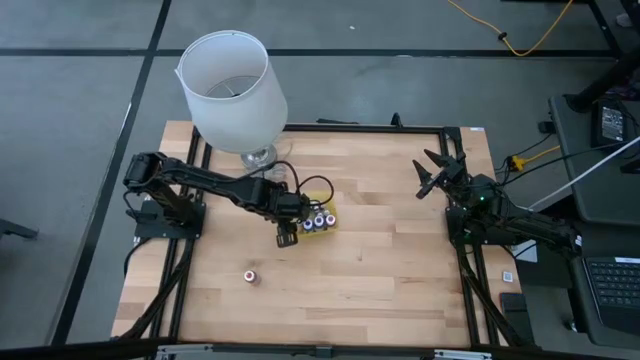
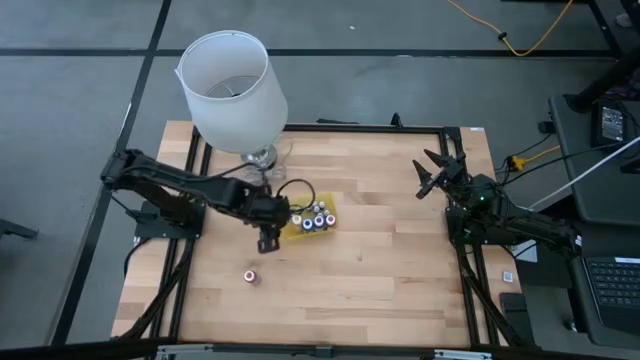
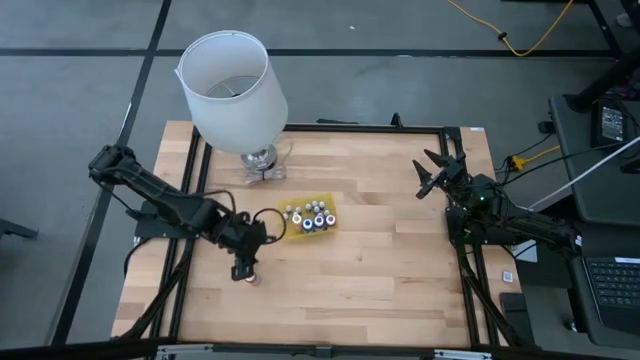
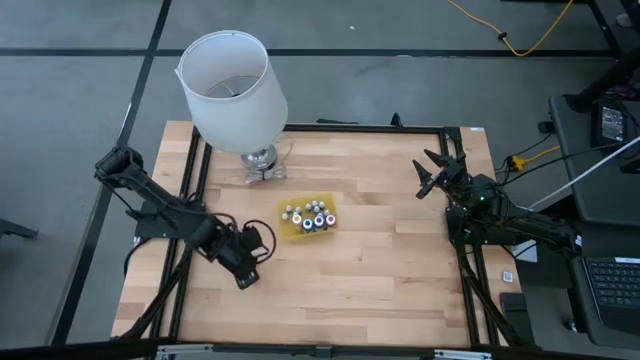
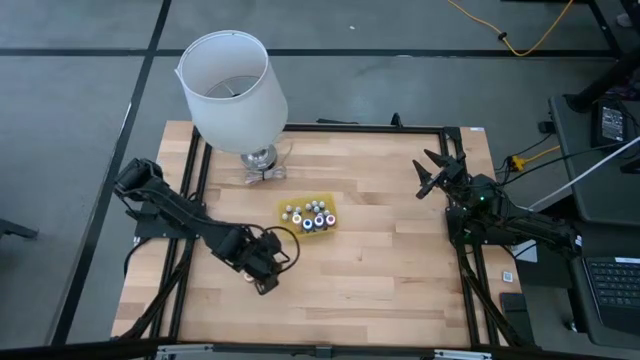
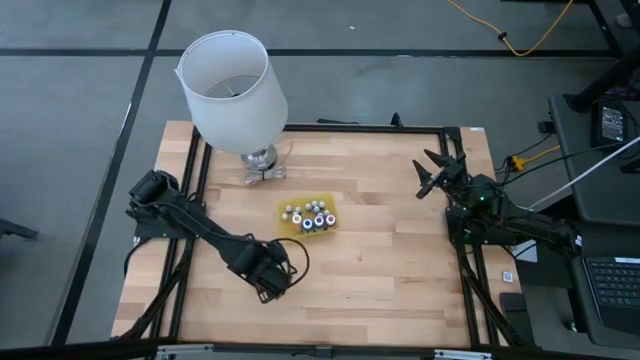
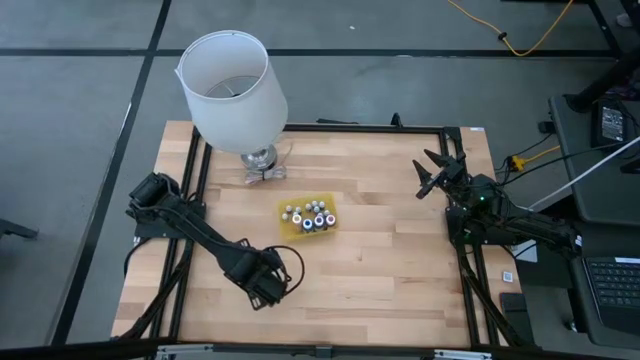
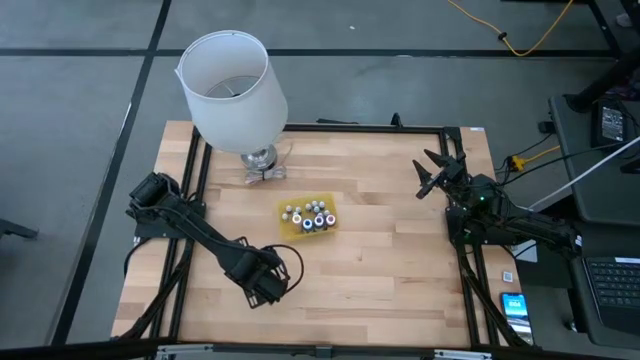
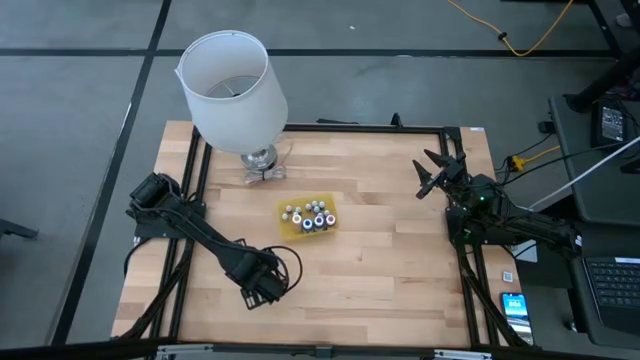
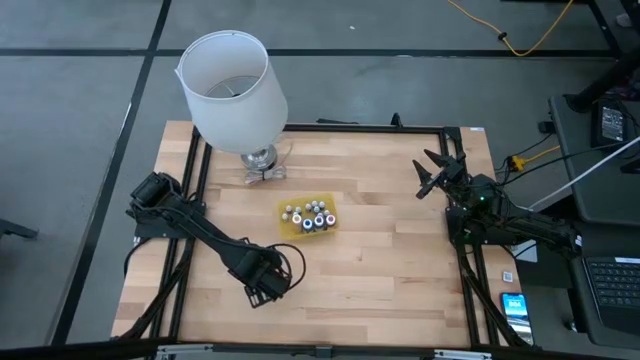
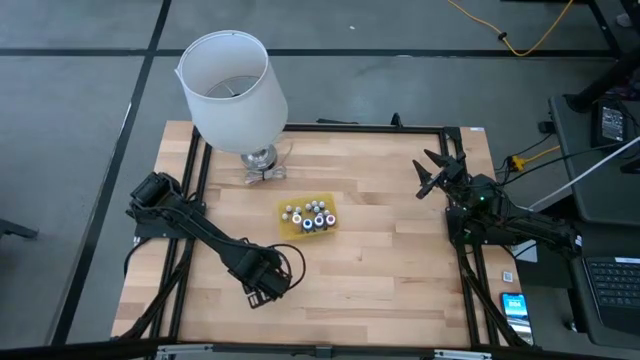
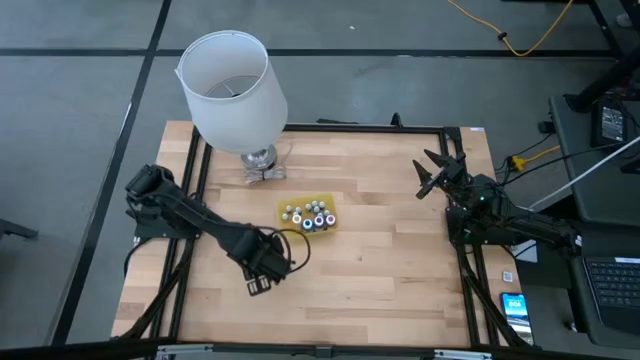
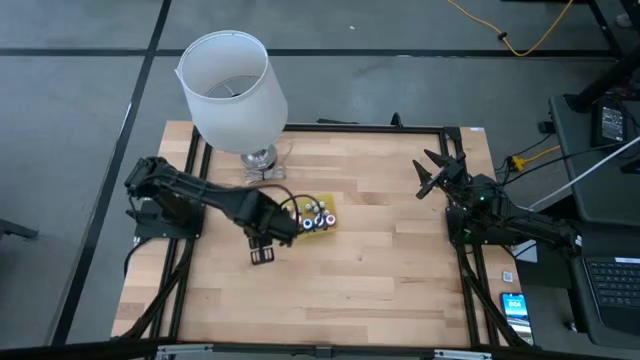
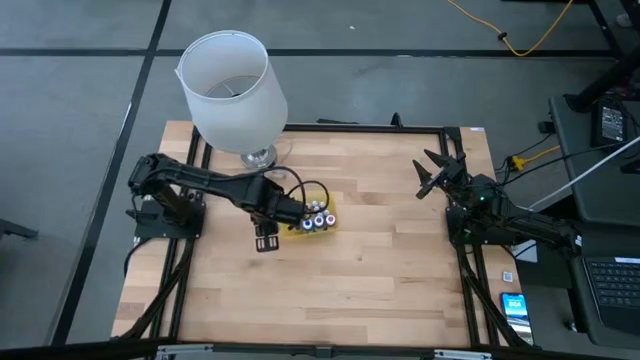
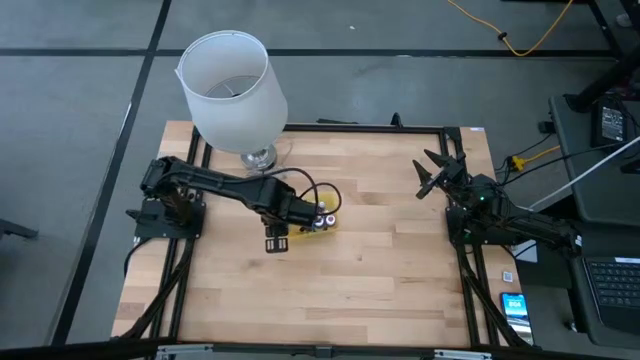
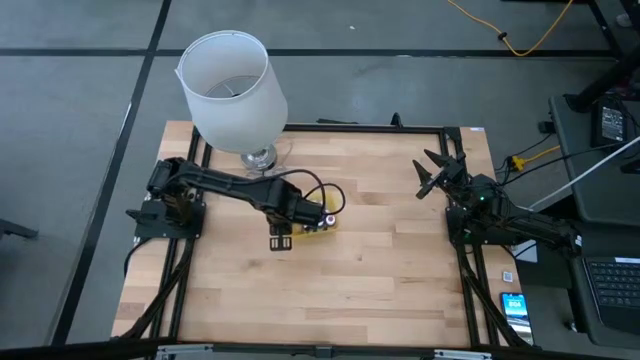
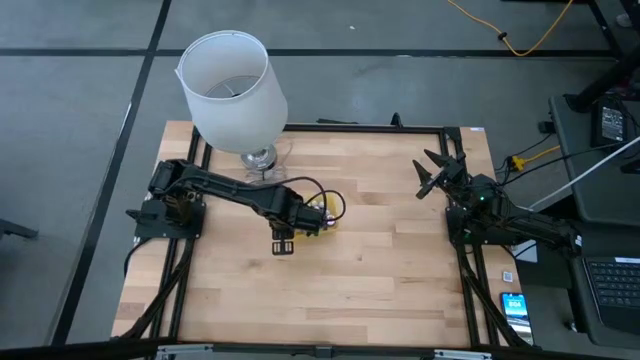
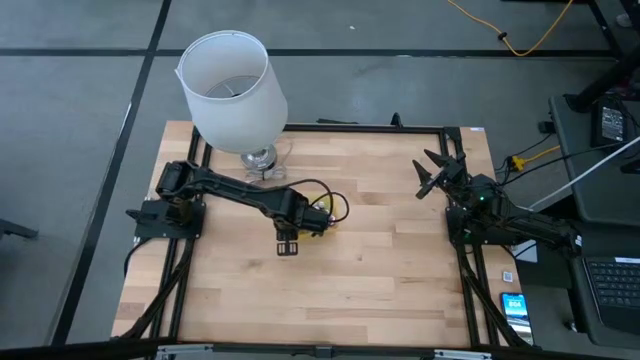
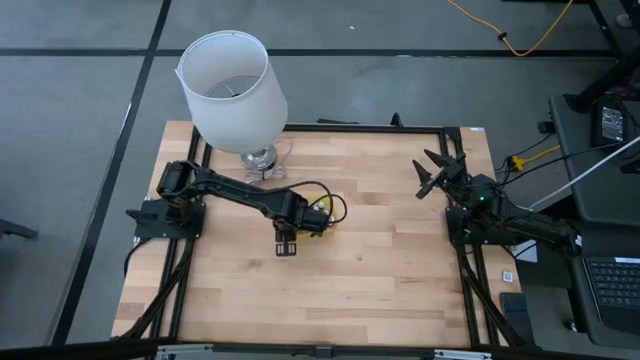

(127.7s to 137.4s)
Task: Pick & Place food coloring
Put the orange food coloring bottle into the yellow bin

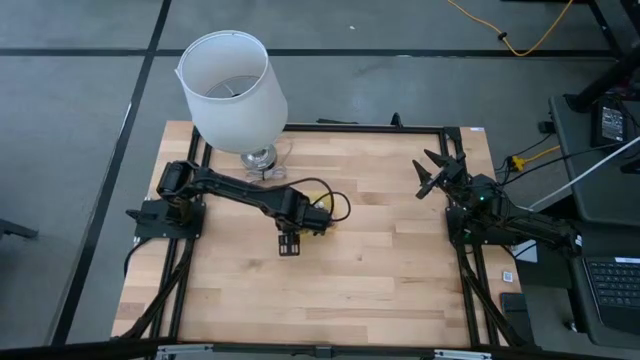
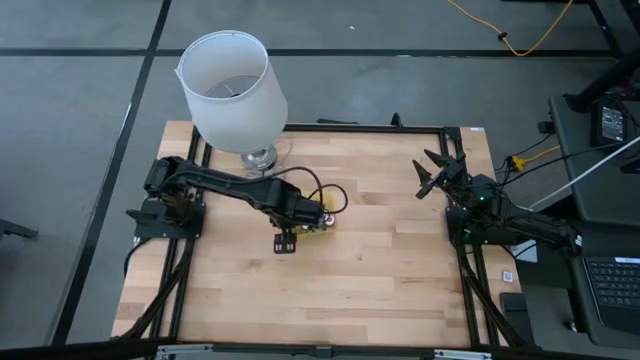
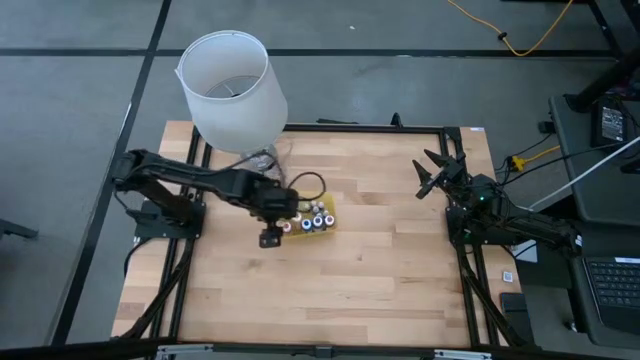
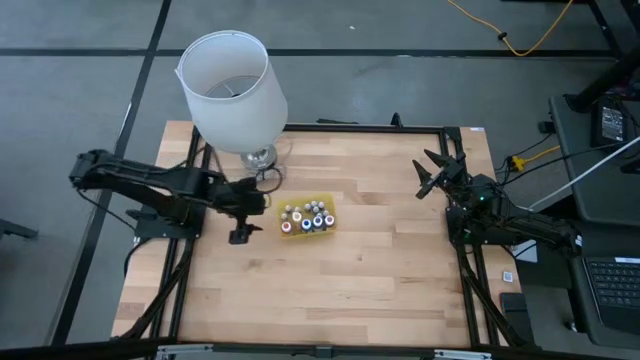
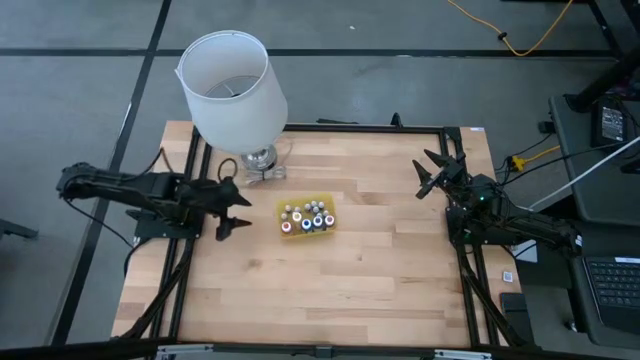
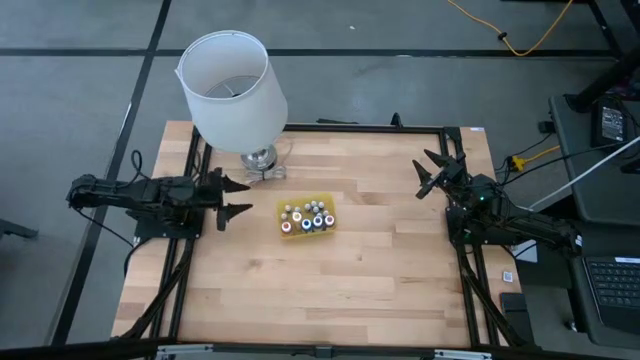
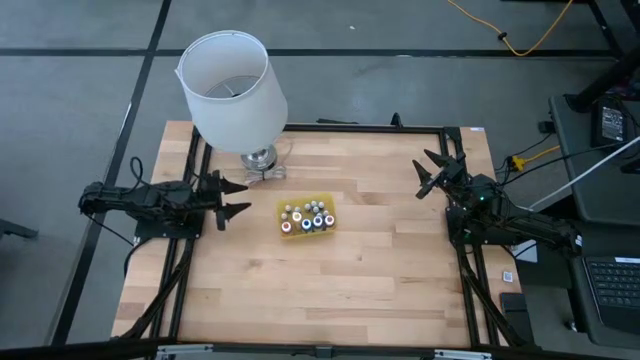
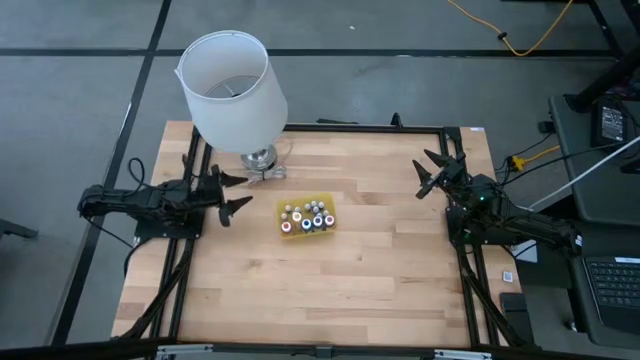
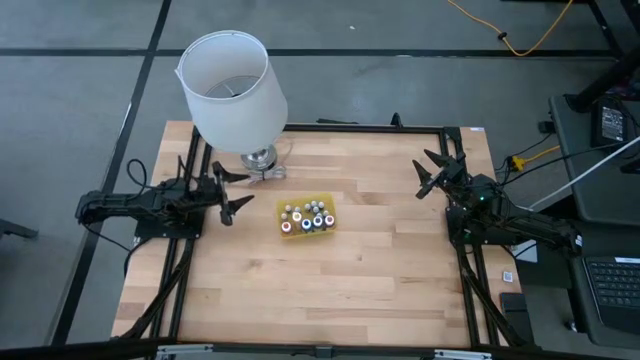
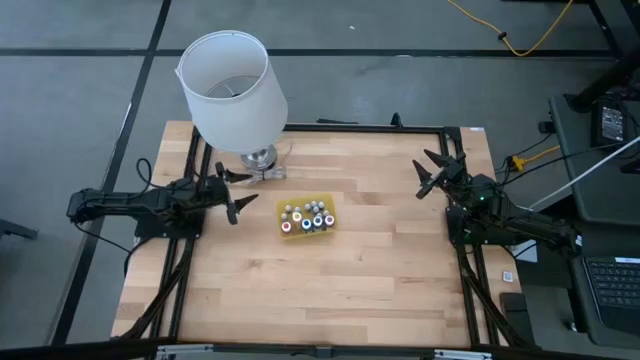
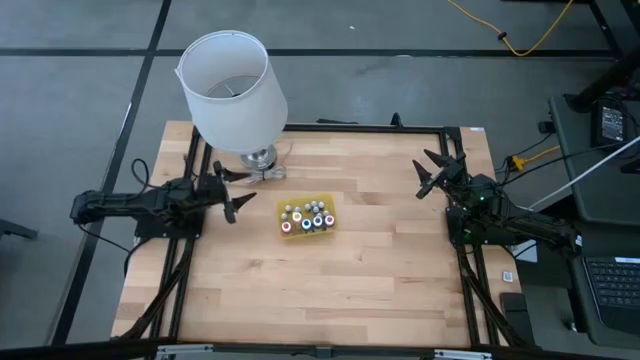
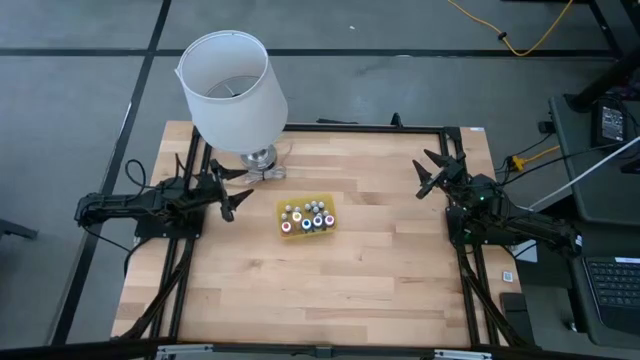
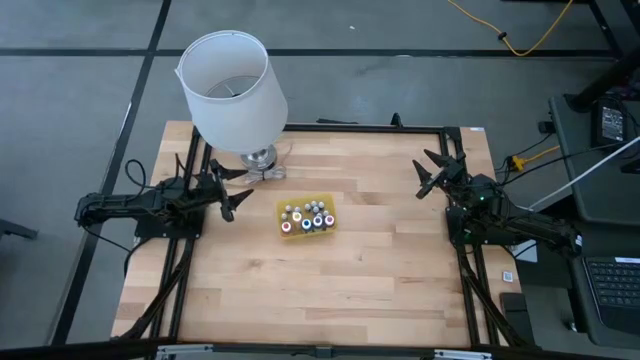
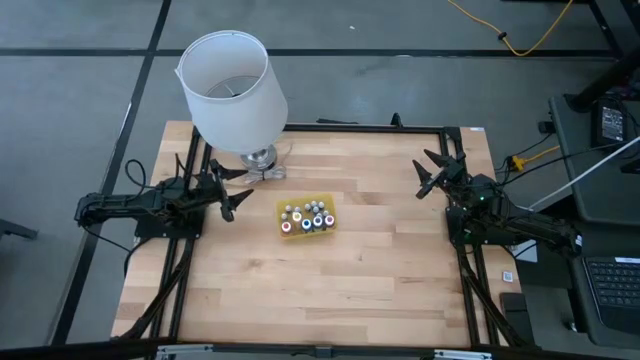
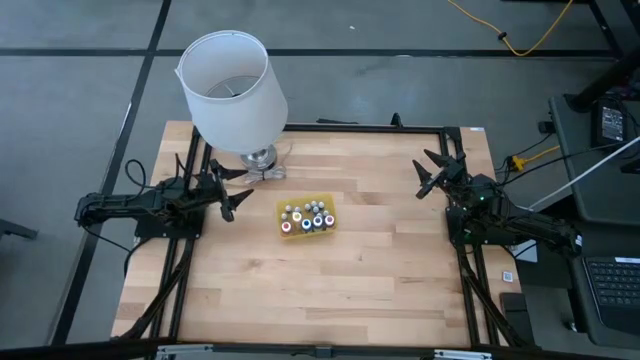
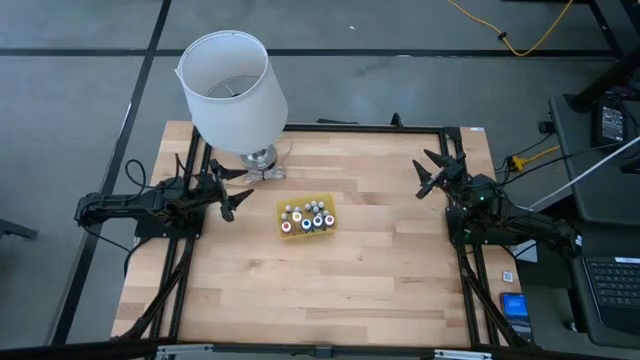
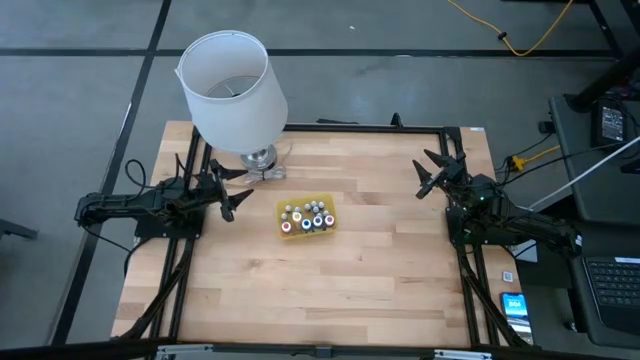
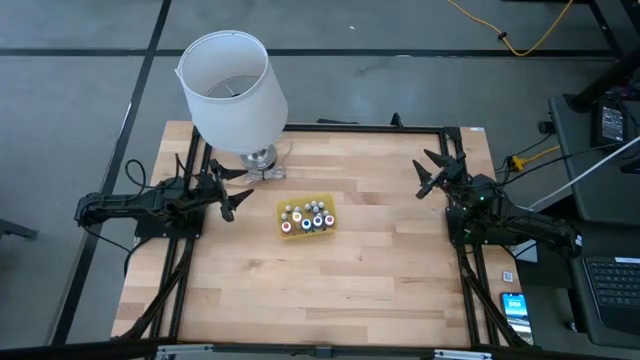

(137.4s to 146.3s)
Return to Home Position

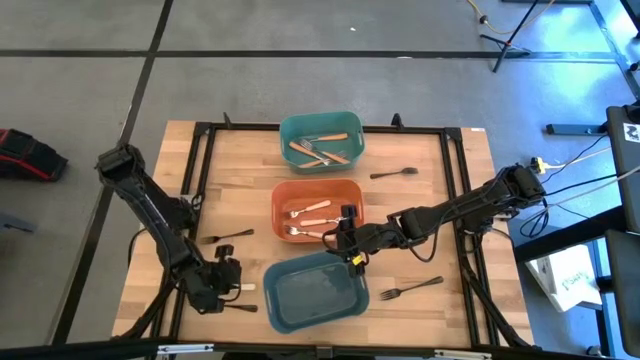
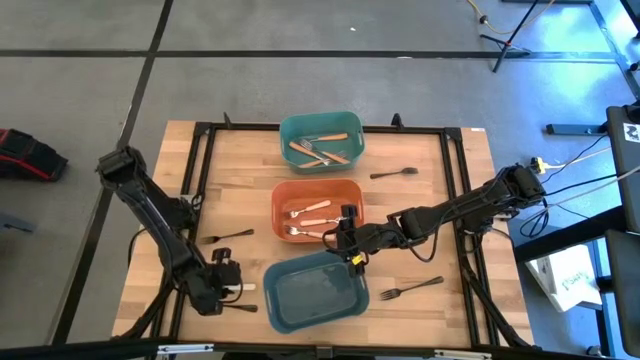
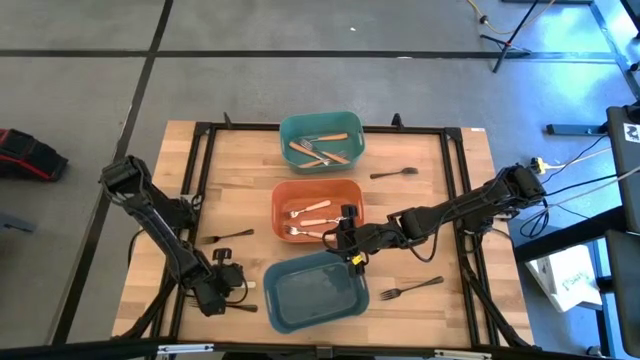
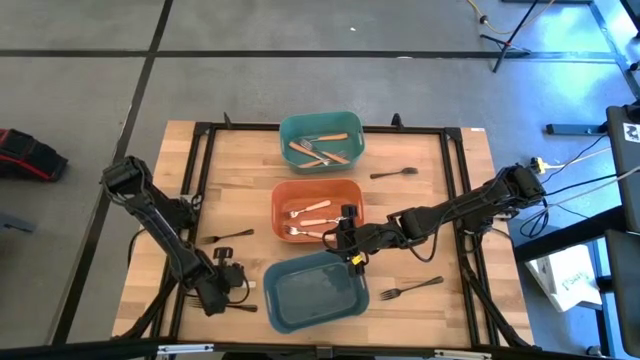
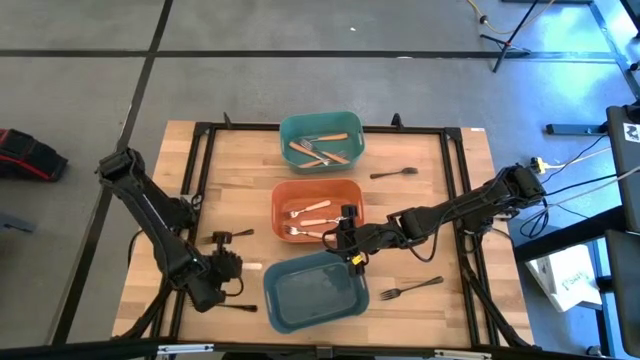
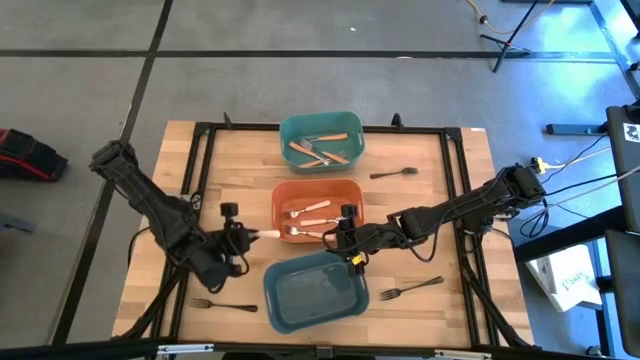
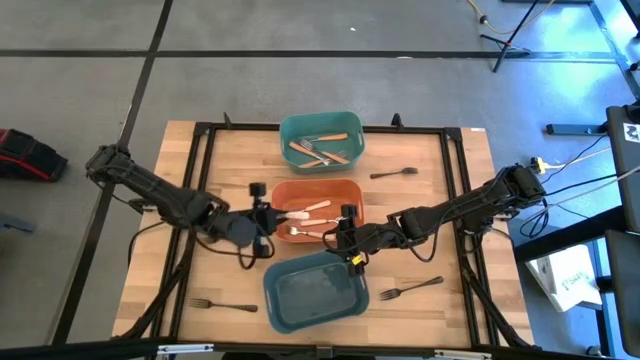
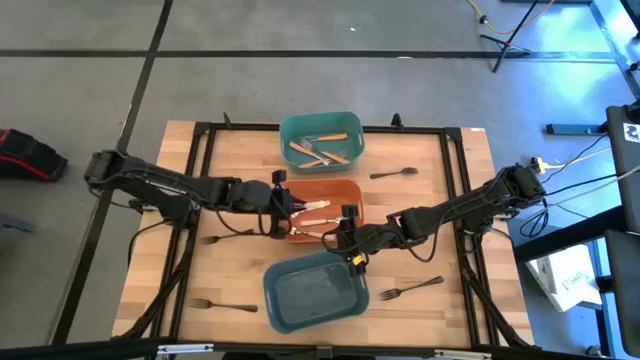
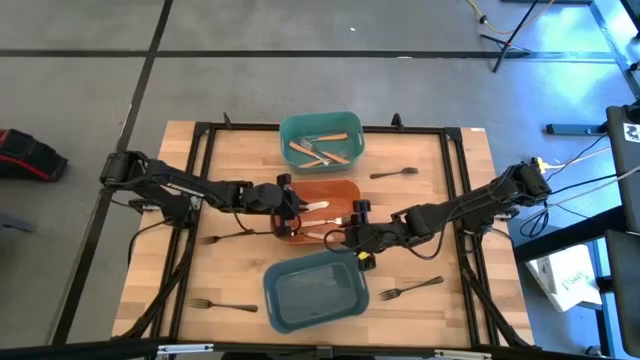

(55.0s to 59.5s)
Task: Sort silverware by color (type)
Put the white fork into the orange bin
